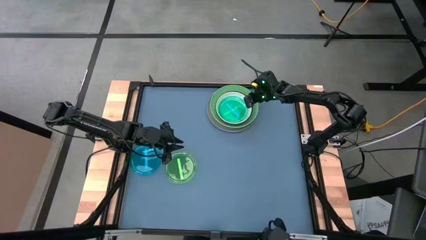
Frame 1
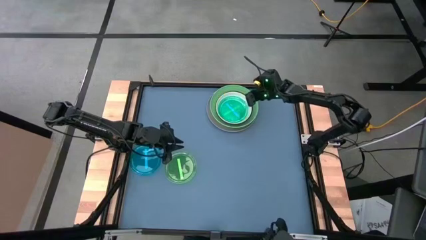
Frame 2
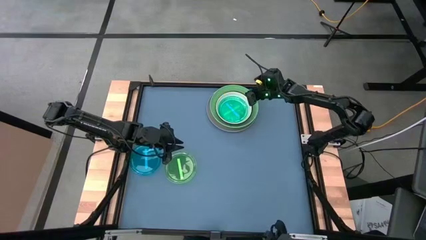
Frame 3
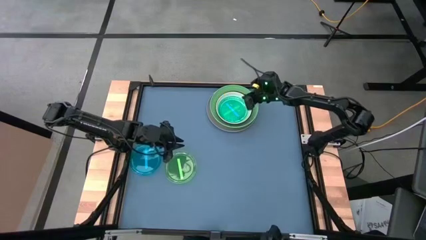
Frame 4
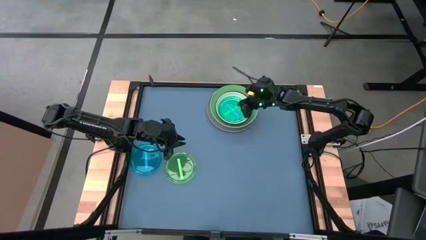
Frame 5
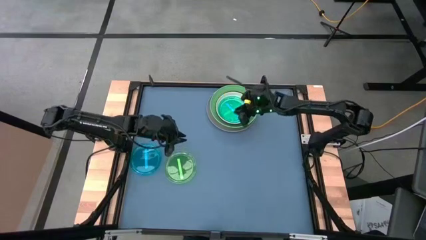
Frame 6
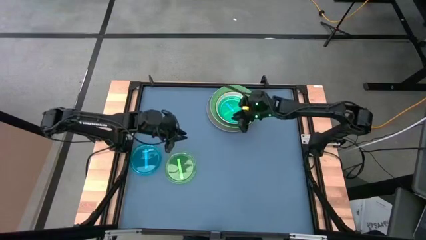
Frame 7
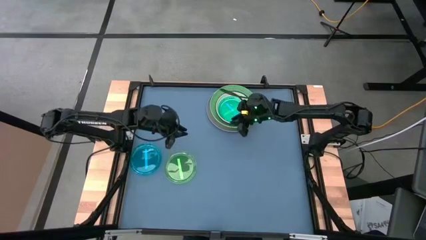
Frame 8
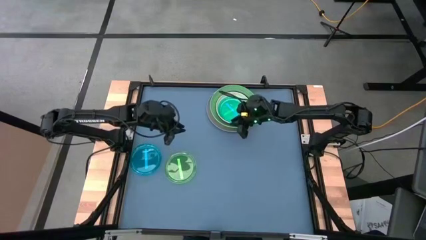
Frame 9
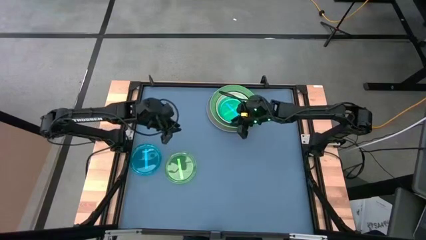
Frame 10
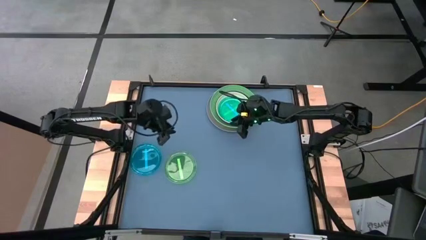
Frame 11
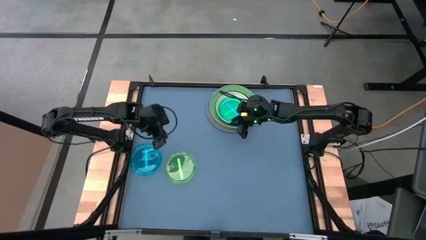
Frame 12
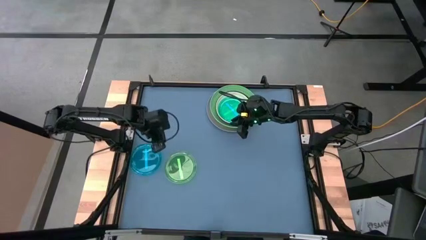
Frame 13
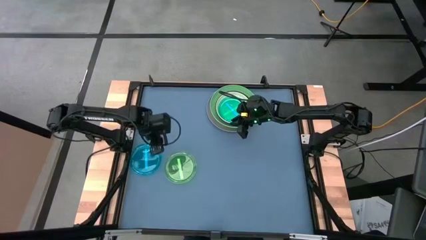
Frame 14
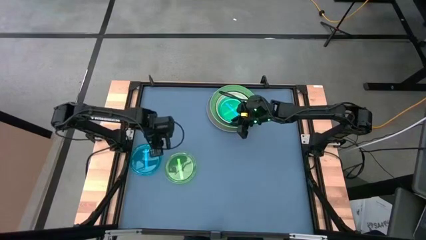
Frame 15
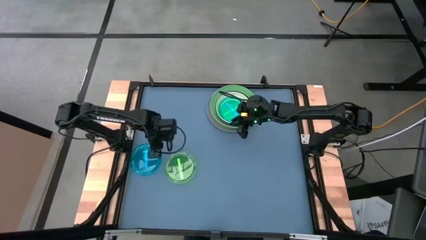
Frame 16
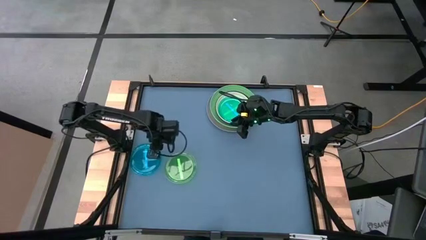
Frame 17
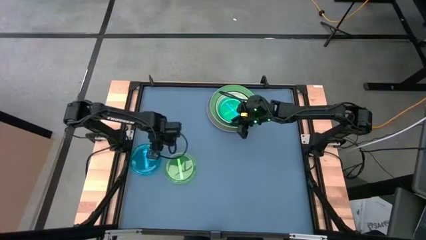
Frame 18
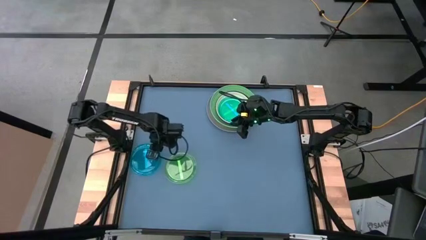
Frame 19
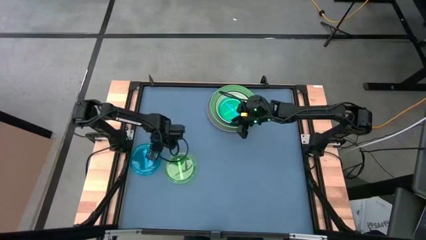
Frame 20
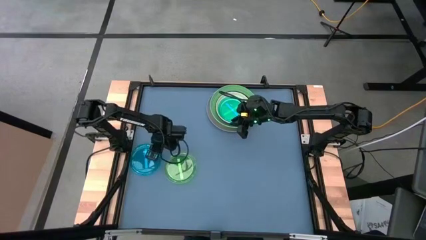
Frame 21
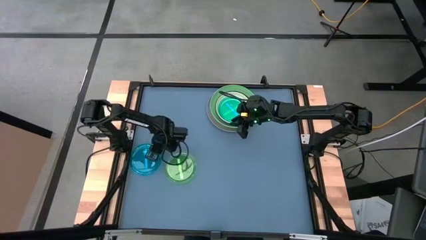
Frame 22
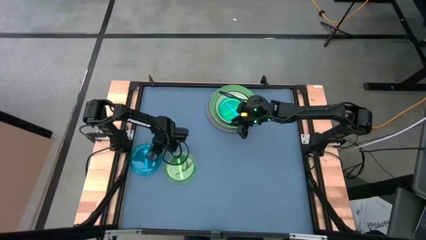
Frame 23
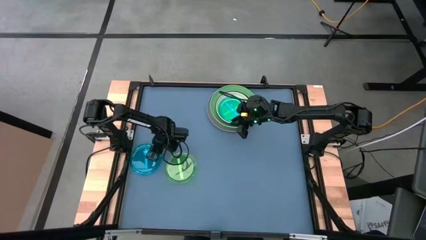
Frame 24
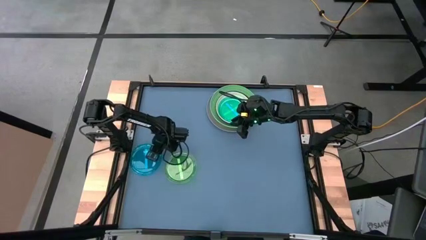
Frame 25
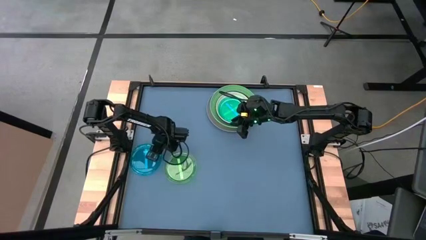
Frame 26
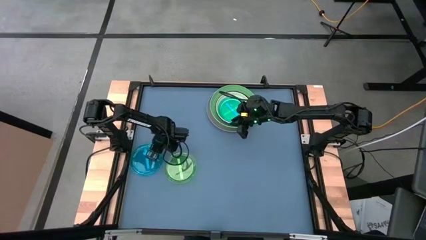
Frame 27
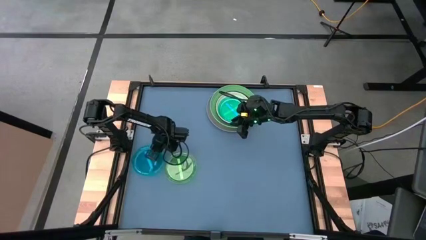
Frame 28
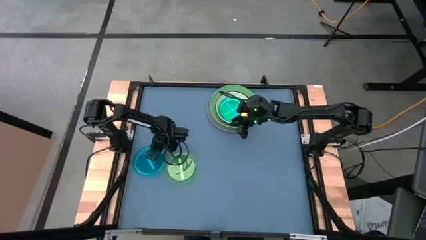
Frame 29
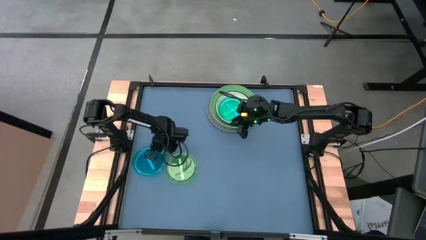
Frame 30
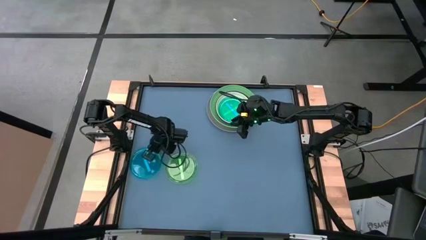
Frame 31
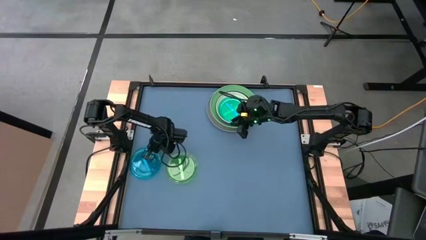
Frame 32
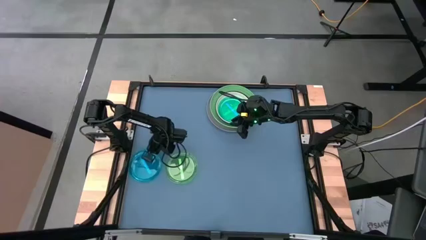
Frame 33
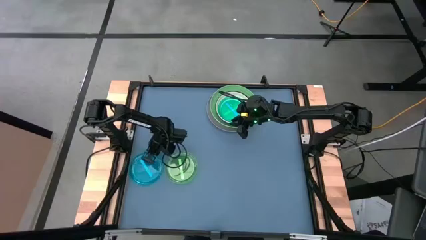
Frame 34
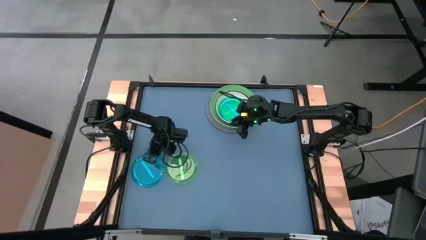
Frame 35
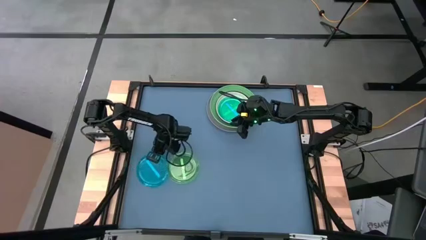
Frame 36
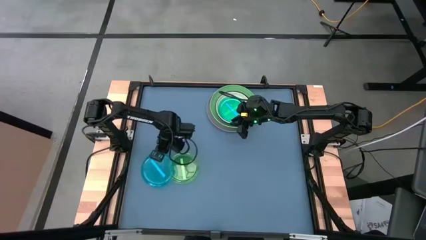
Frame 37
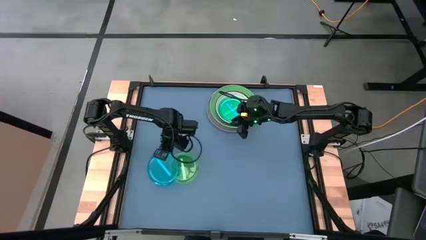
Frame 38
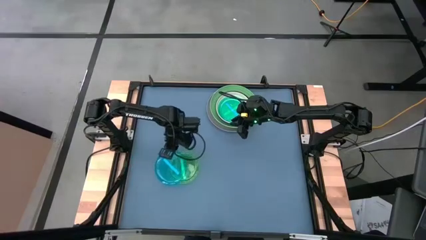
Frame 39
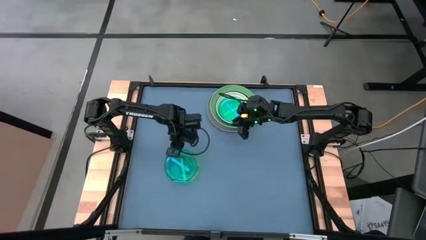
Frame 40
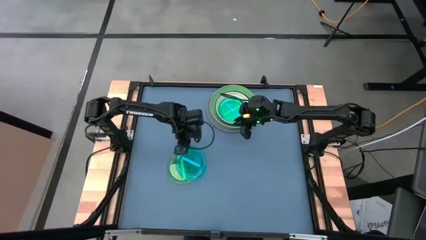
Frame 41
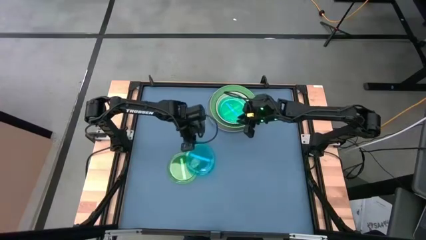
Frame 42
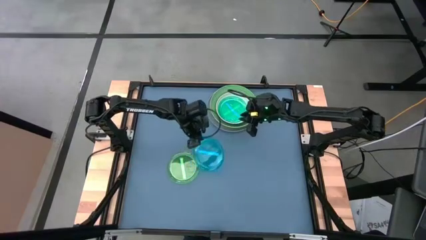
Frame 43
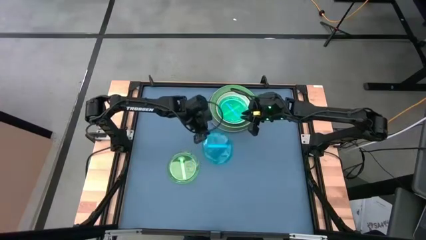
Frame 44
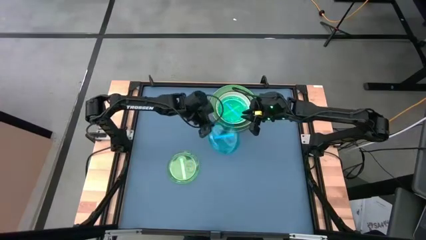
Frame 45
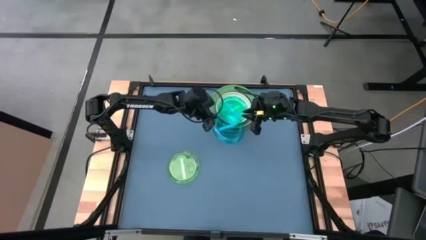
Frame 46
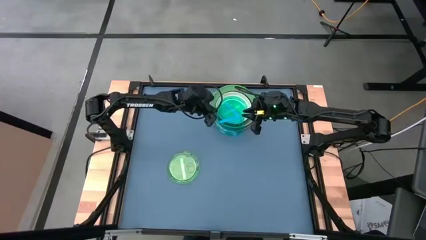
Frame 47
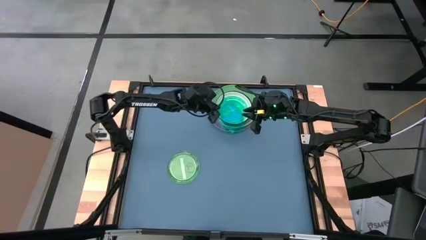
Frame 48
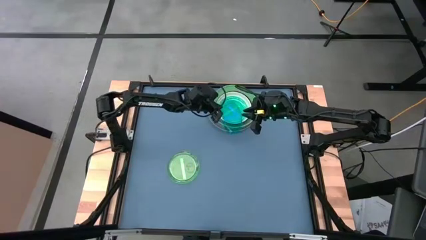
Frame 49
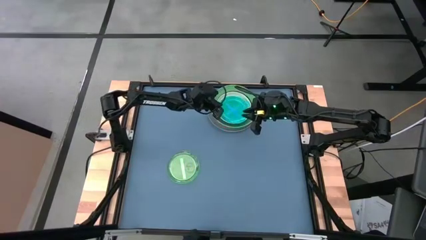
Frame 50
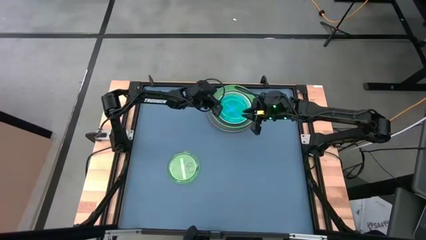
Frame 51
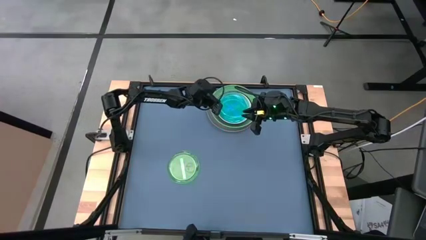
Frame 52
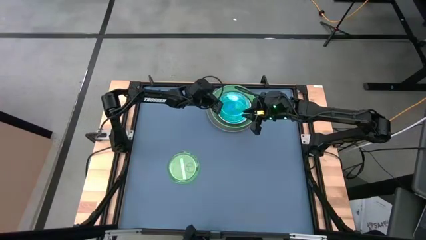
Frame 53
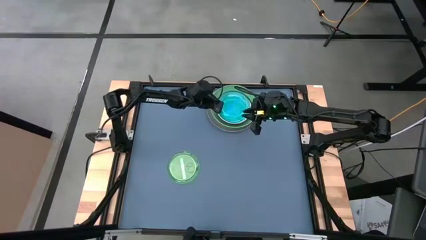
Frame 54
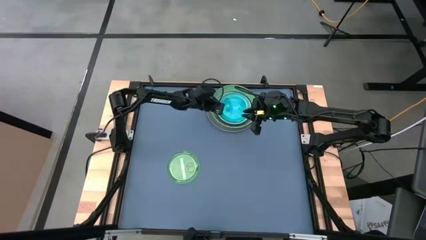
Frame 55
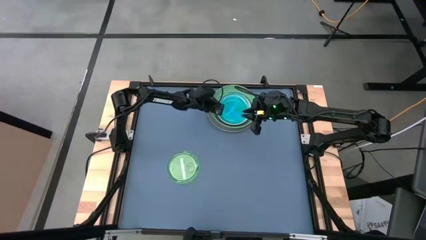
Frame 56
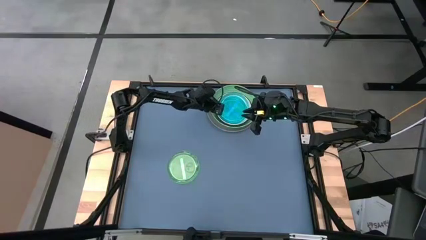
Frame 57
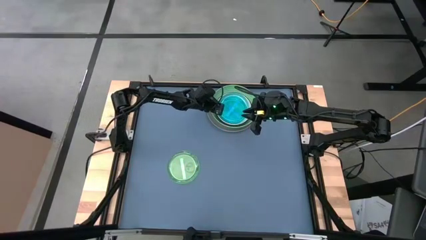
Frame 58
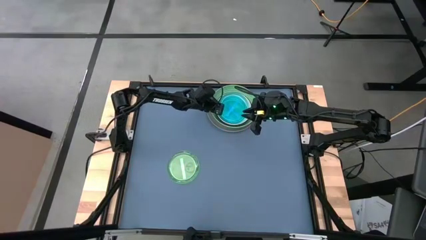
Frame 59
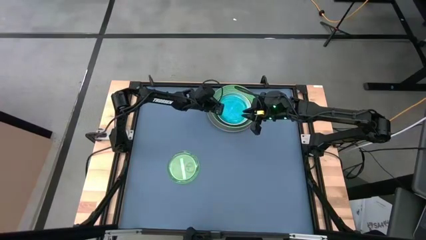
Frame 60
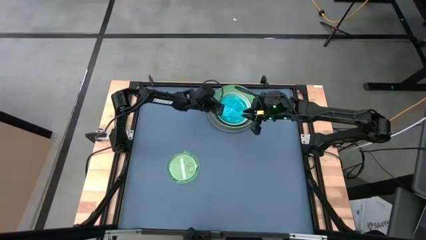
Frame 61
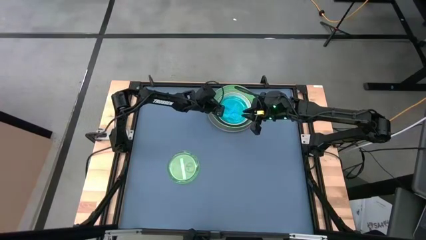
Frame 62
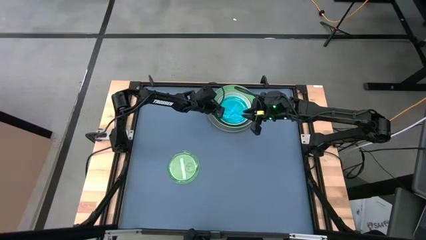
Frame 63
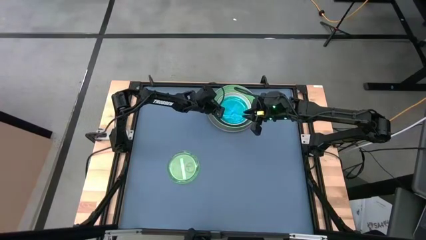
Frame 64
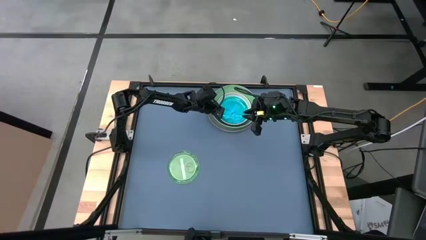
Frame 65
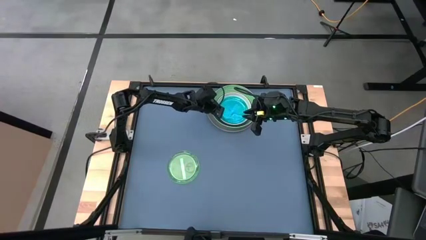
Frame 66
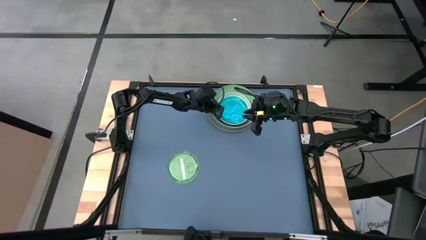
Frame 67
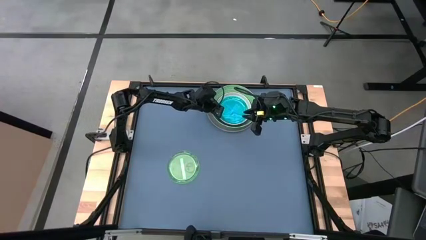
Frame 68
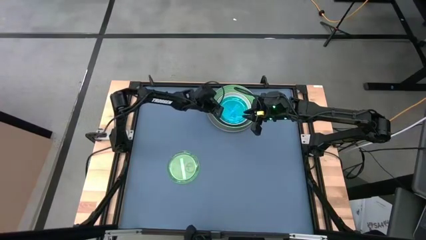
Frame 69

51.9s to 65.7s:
Task: Stack plastic plates
Stack the small blue plate on the small blue plate

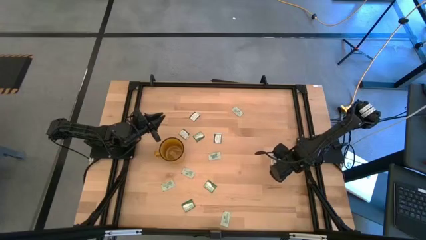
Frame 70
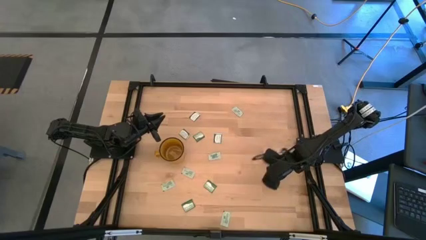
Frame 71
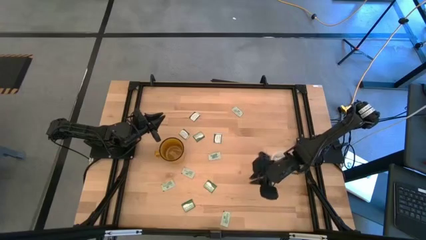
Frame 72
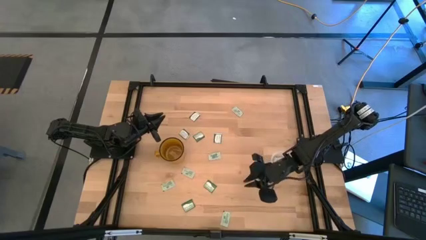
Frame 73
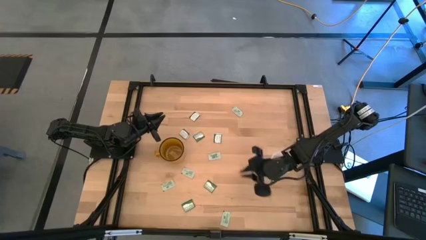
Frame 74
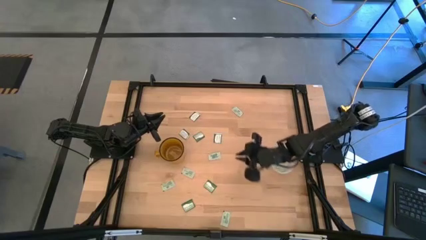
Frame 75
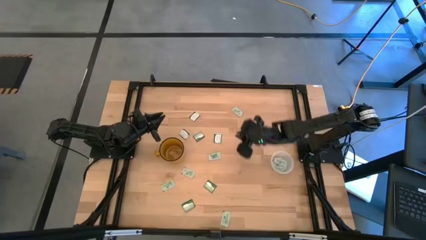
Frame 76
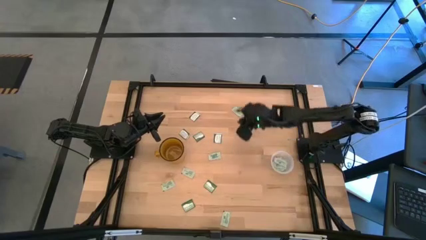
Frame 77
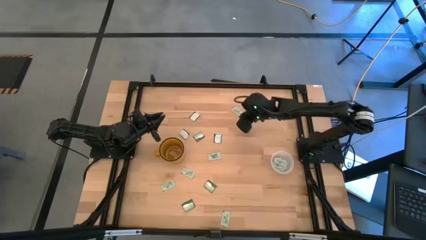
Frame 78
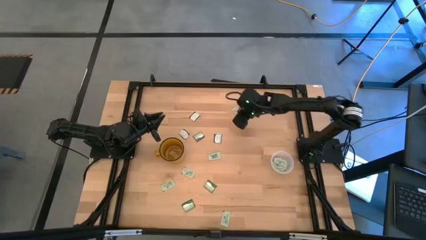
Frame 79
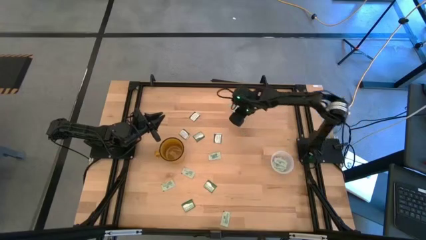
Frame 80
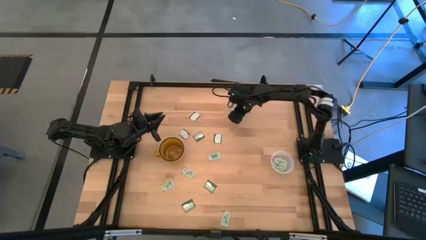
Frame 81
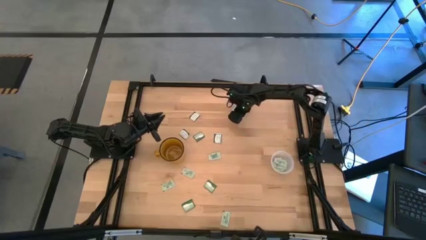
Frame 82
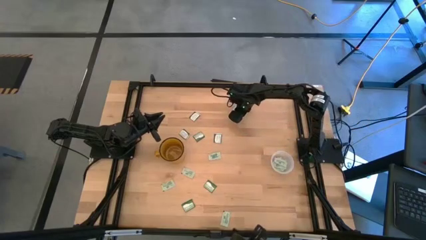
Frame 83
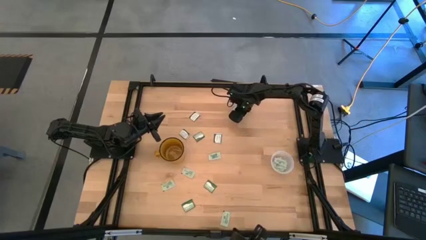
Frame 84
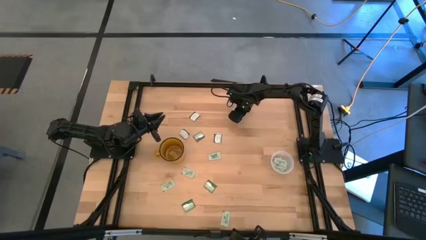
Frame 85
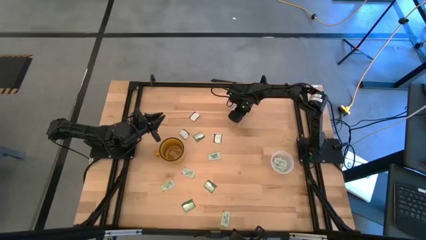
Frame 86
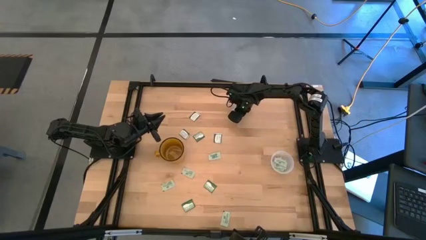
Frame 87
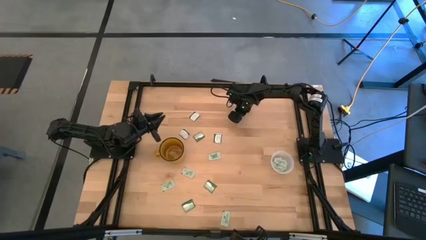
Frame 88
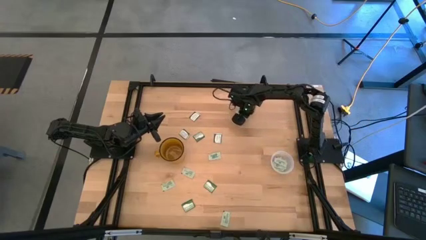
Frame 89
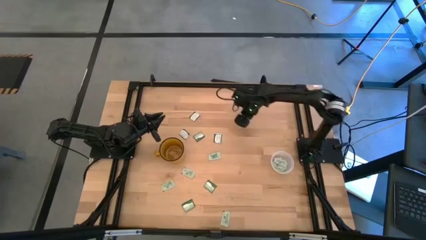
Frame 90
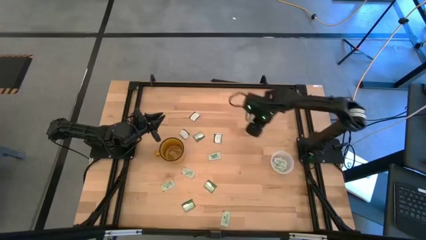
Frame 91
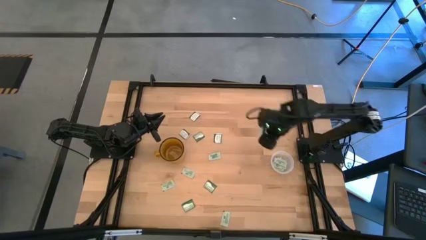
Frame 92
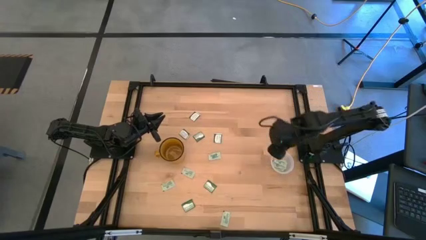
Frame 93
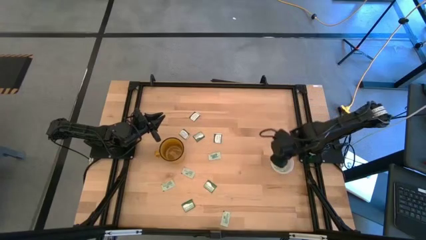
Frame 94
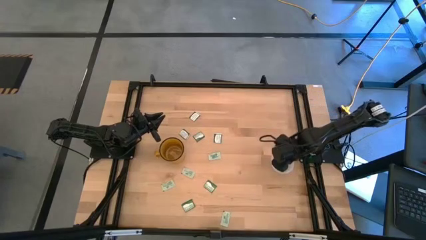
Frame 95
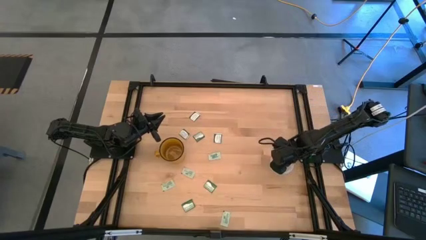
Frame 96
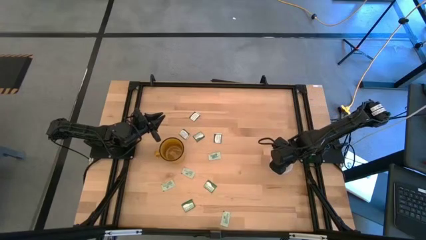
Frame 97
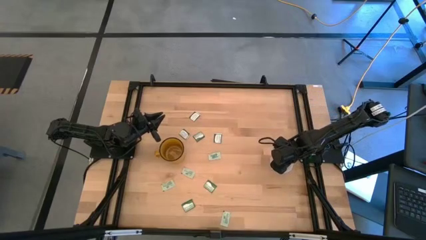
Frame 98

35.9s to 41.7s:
Task: Pick and place Stevia / Truvia into bins
Put the green stevia packet into the transparent container
